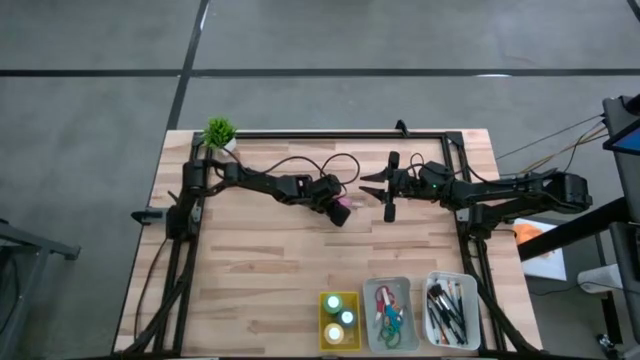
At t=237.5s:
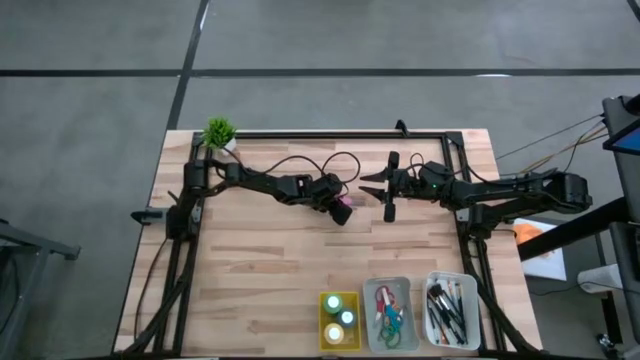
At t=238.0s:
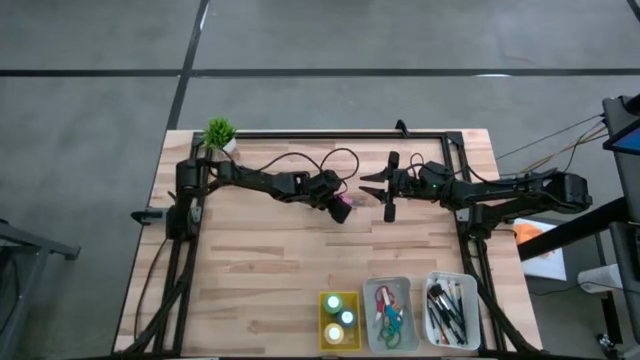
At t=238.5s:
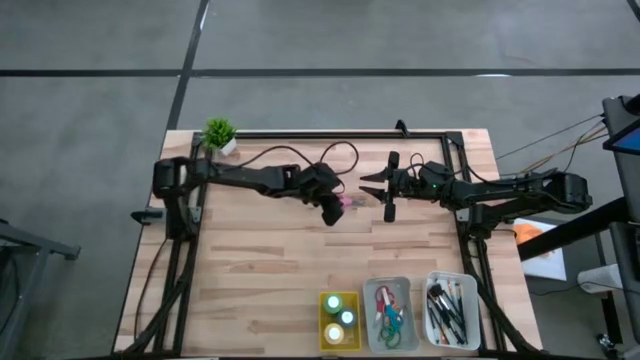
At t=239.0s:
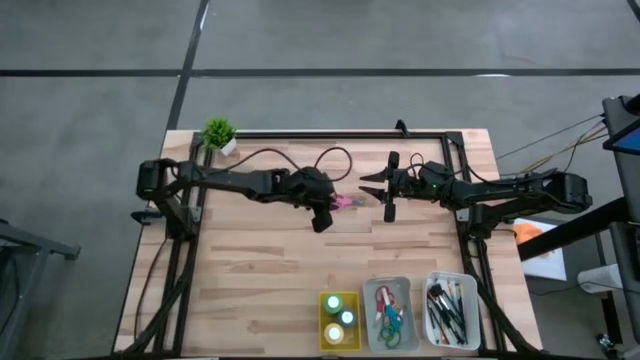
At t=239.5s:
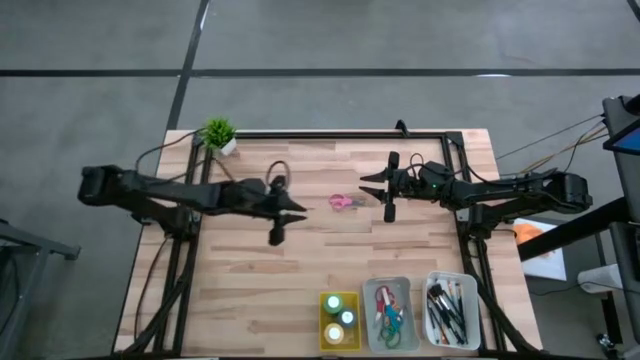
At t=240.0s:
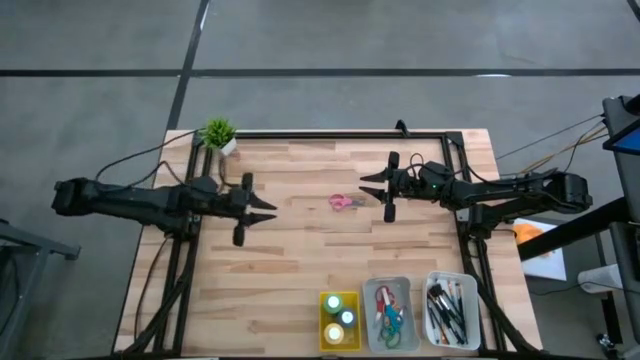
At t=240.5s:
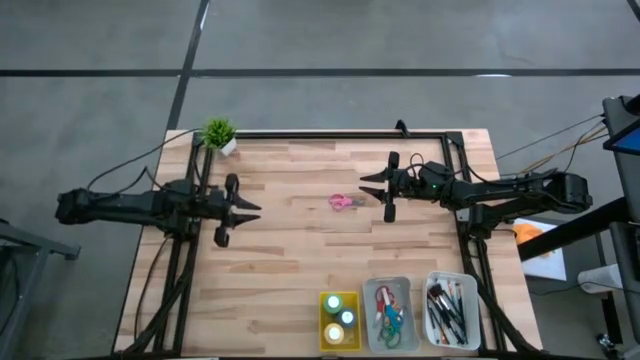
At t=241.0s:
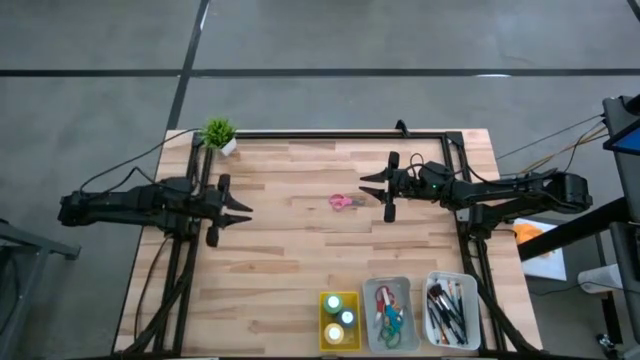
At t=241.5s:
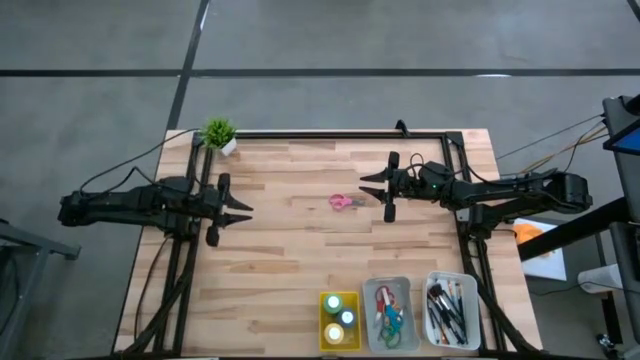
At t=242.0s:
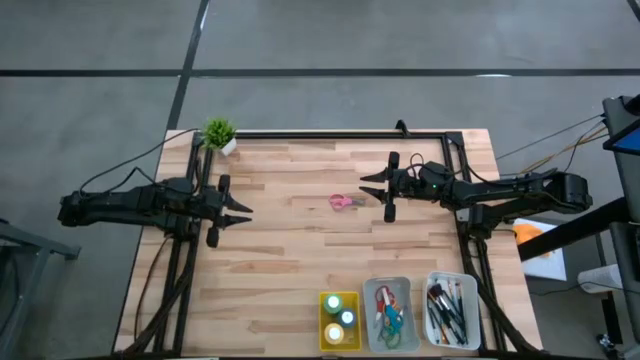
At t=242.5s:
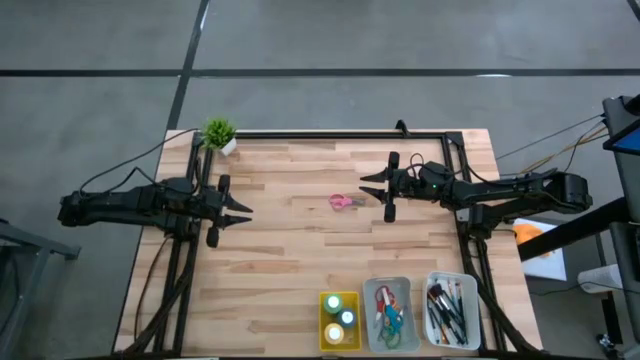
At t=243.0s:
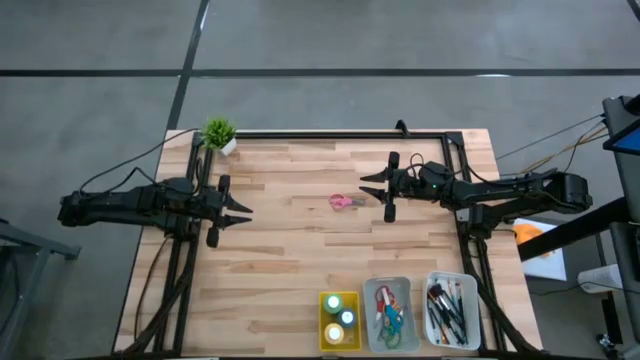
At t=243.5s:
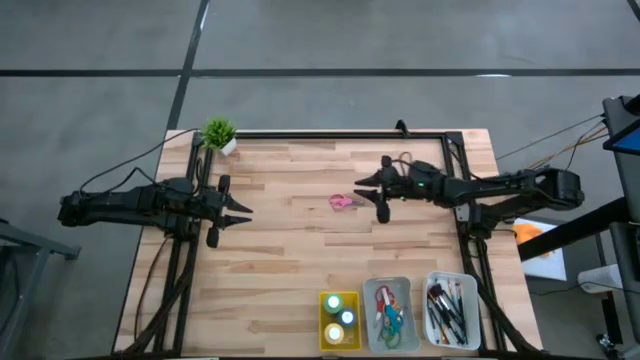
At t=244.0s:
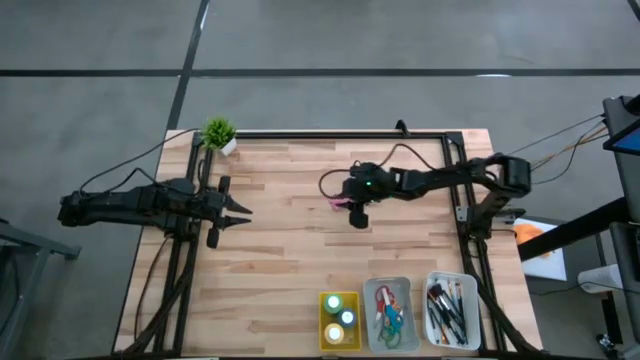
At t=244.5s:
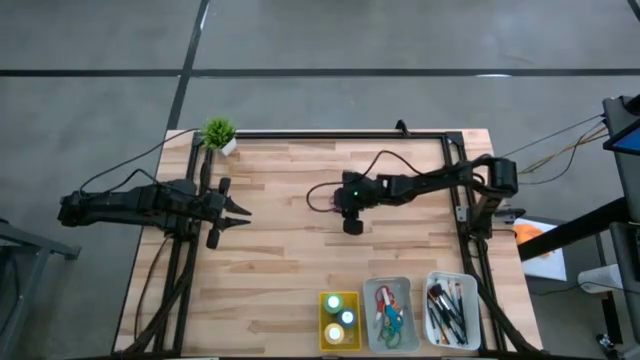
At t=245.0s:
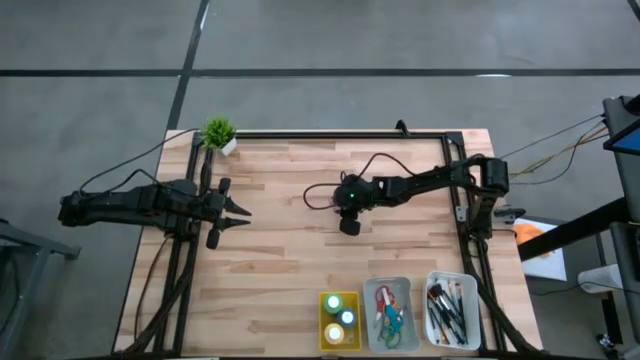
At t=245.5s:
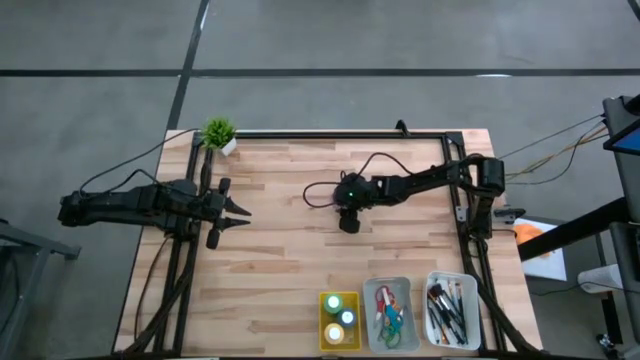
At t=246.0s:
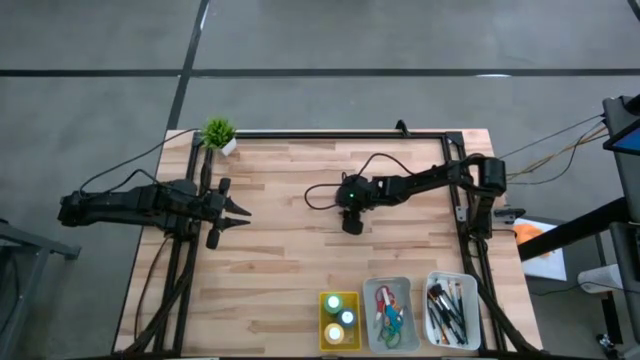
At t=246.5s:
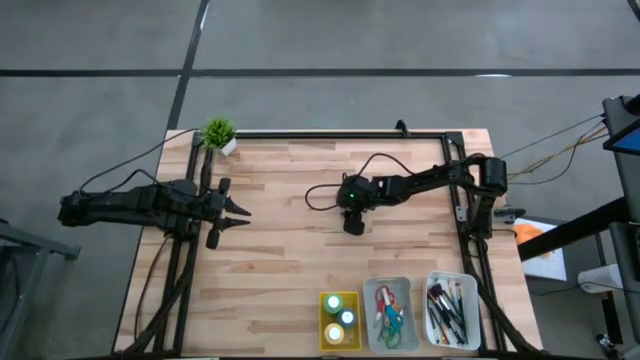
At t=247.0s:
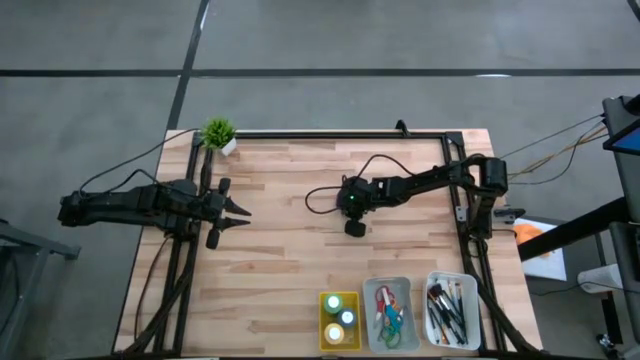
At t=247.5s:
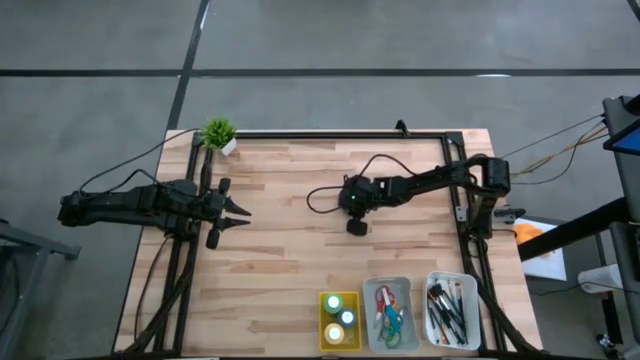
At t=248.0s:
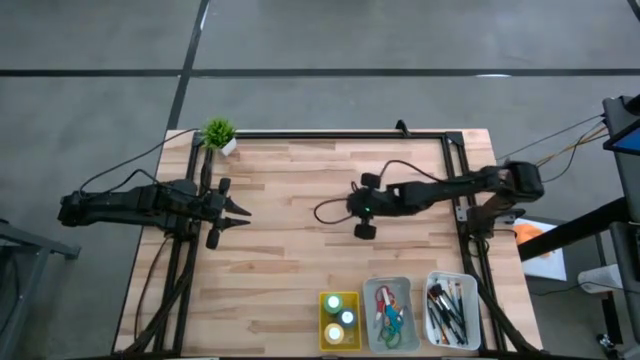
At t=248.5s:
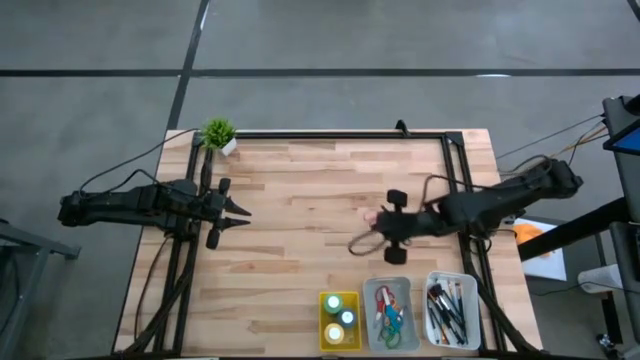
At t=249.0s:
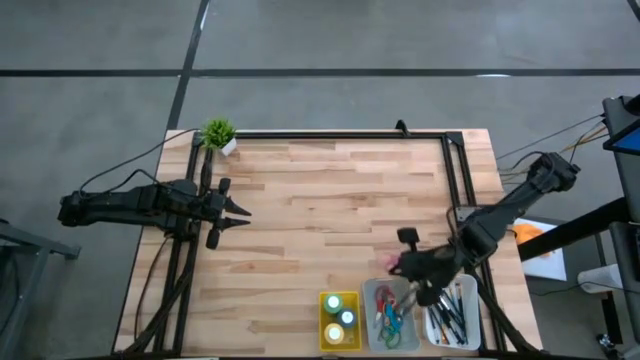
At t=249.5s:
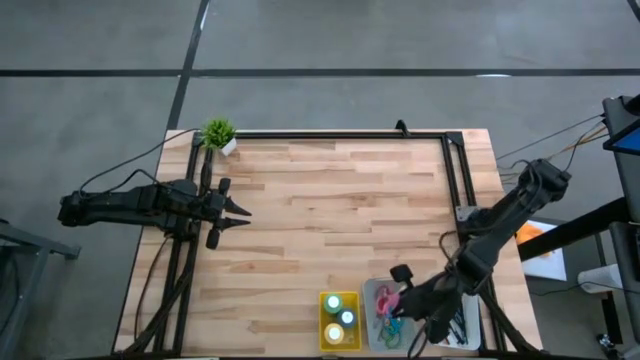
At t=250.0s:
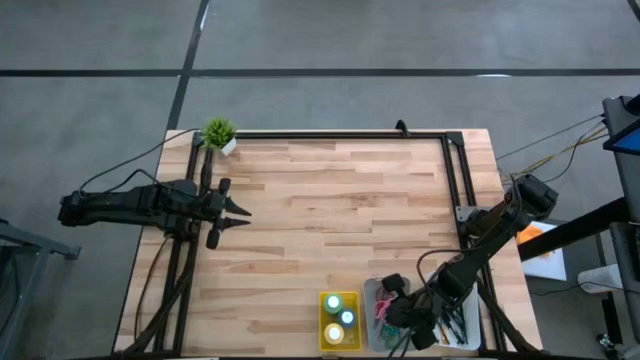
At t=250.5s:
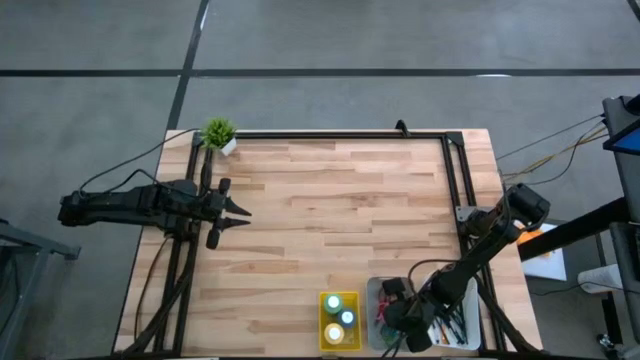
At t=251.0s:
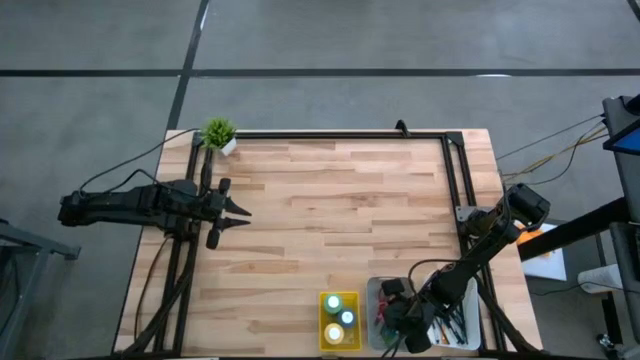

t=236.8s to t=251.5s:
Task: Pick & Place Paint Supplies
Put the pink scissors into the gray bin
